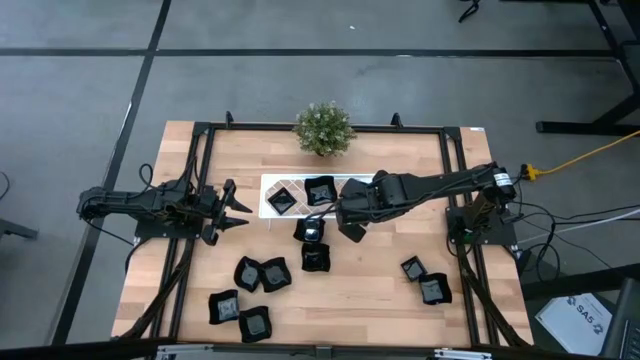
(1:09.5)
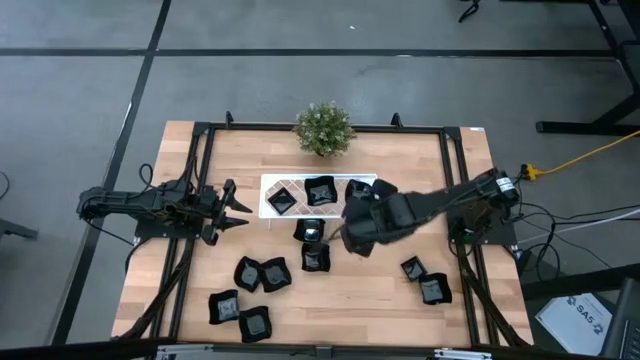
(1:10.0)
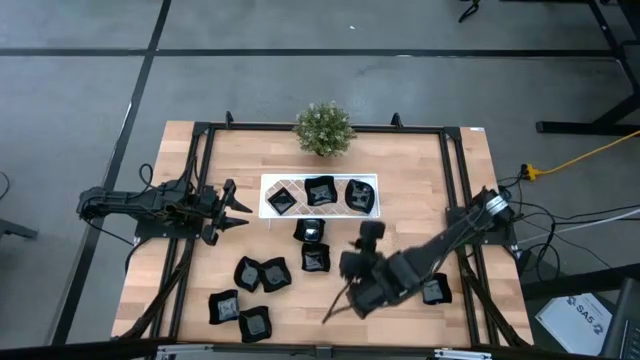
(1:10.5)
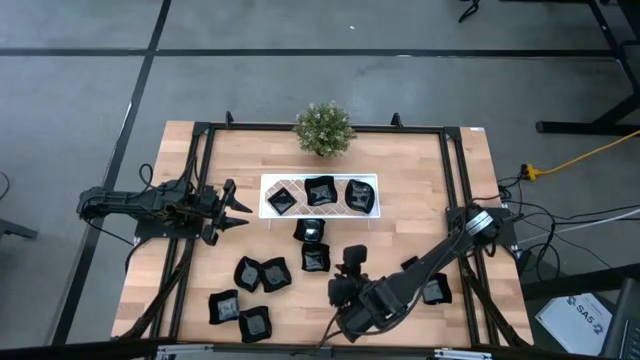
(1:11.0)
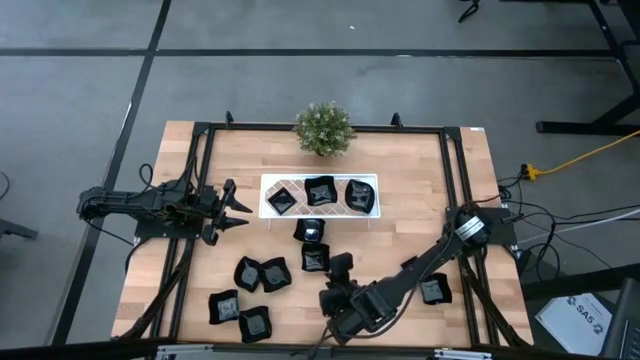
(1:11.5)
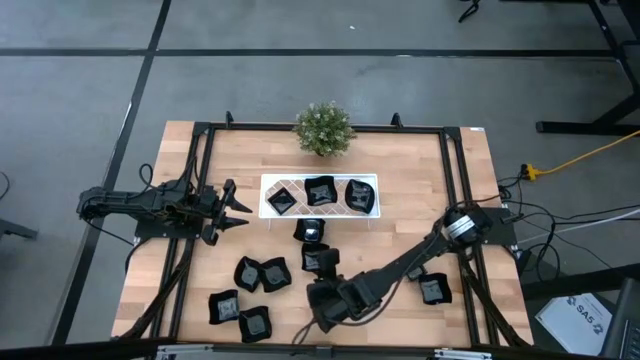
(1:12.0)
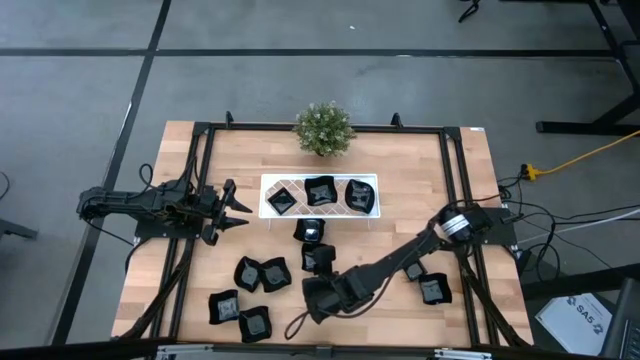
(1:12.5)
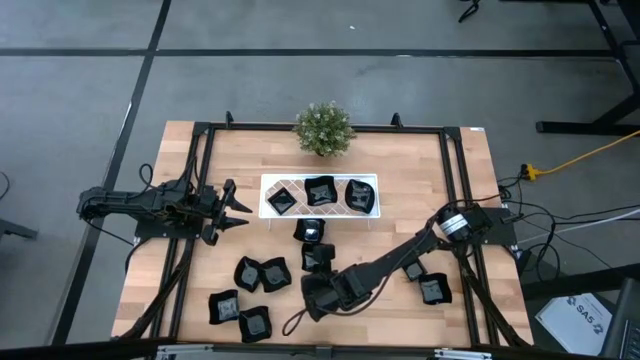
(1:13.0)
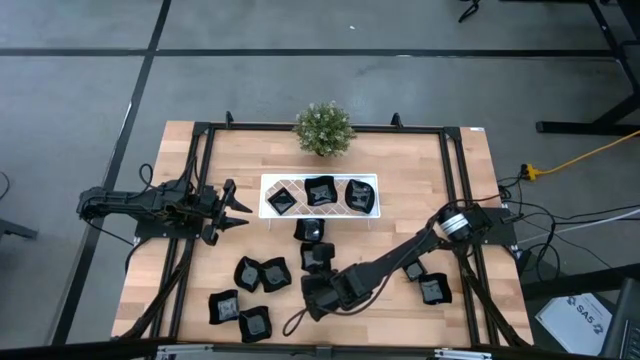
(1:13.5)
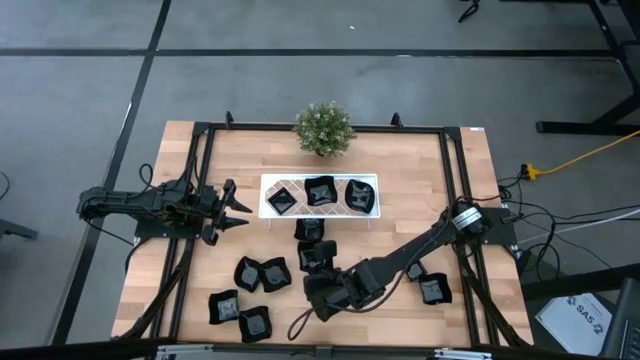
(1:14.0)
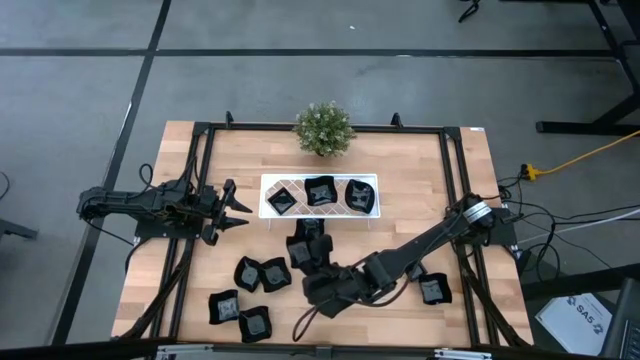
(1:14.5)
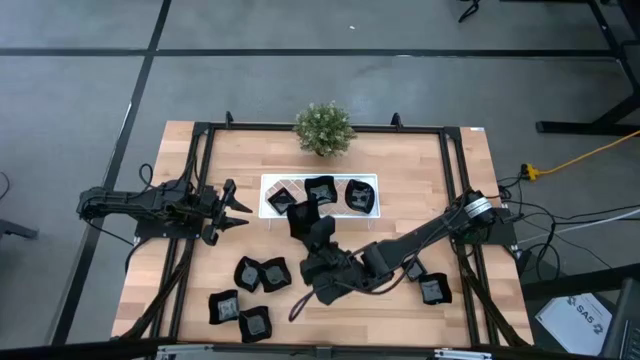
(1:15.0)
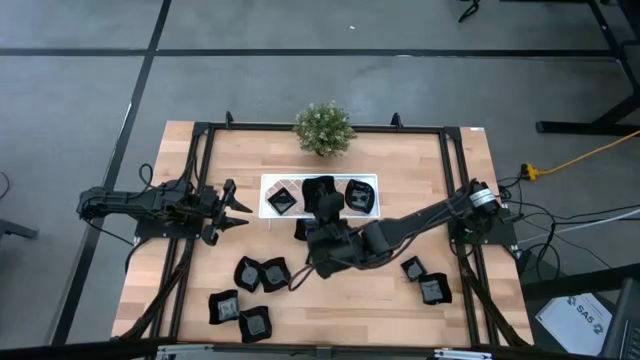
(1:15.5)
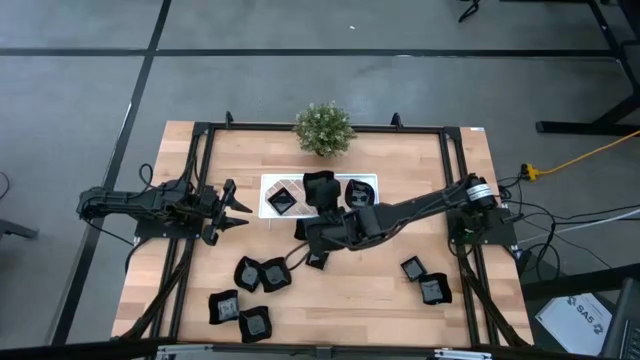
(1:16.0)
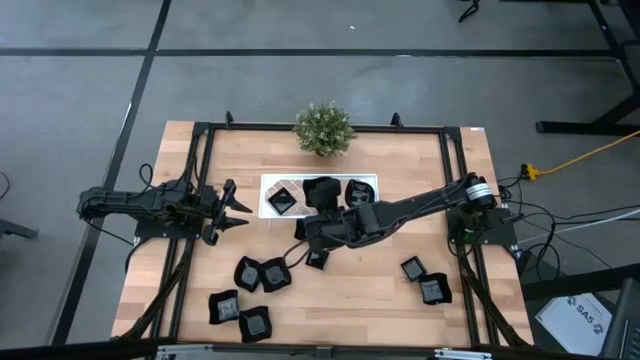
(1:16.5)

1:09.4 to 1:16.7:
Task: Pick & Place Mini shaped plates
Stack the black distorted square plate on top of the black distorted square plate on the shelf

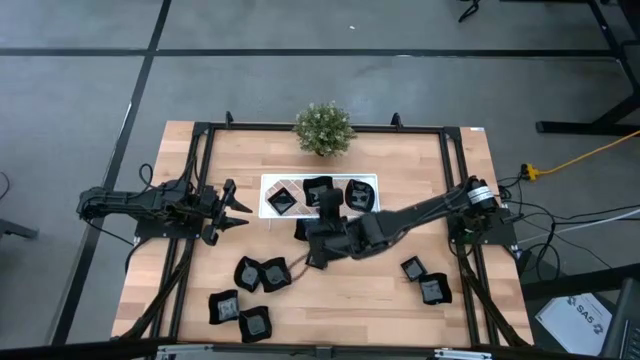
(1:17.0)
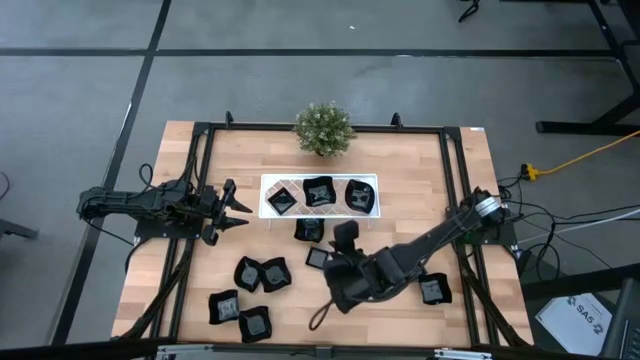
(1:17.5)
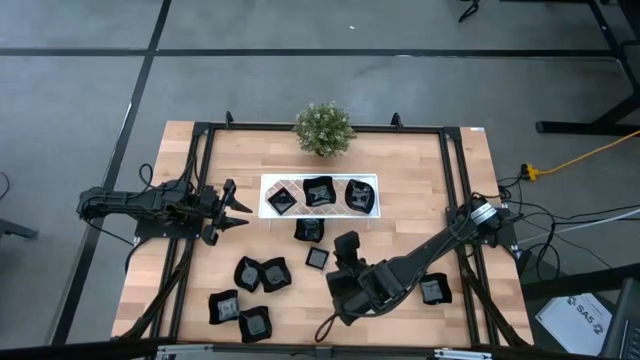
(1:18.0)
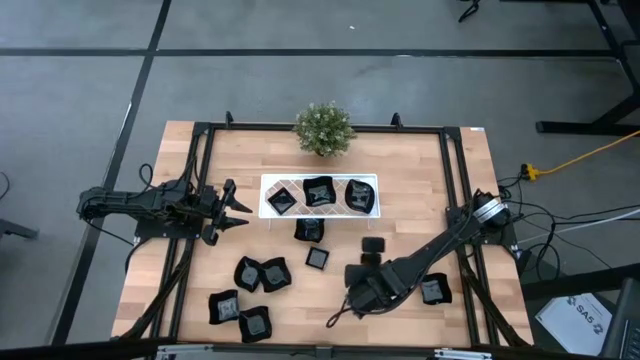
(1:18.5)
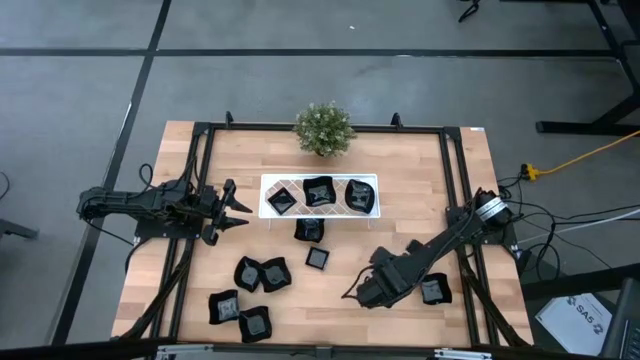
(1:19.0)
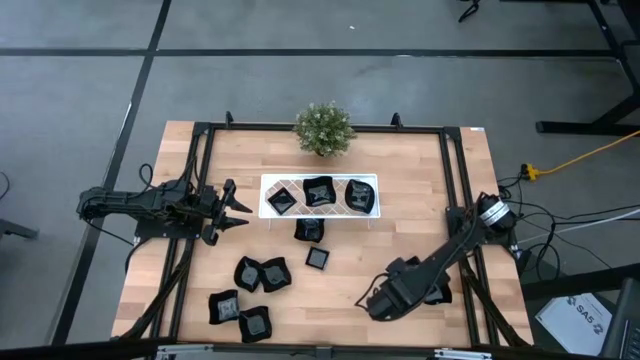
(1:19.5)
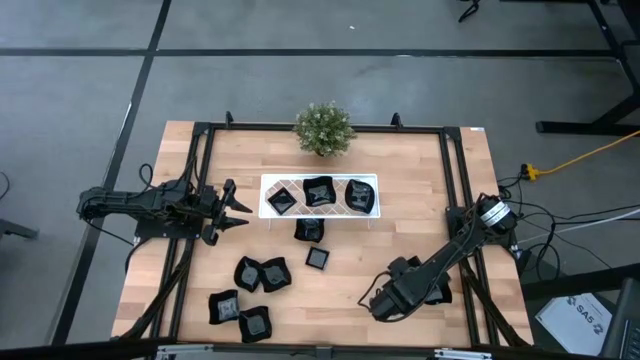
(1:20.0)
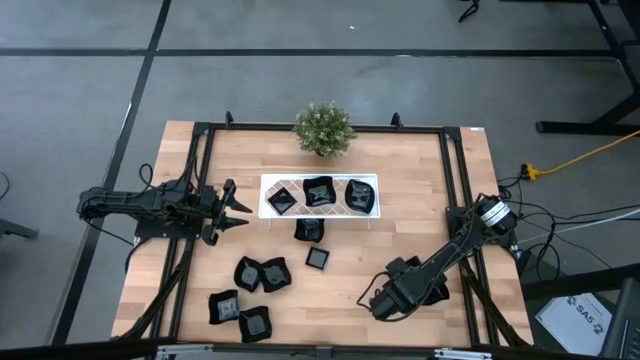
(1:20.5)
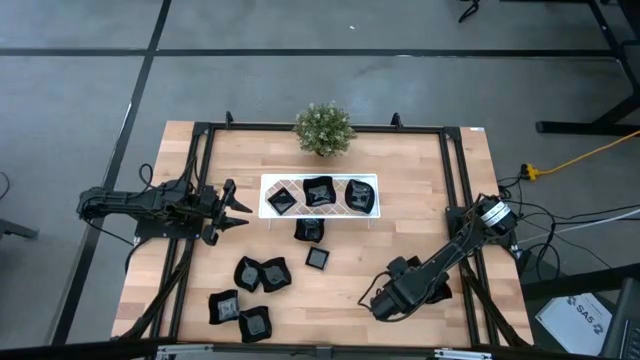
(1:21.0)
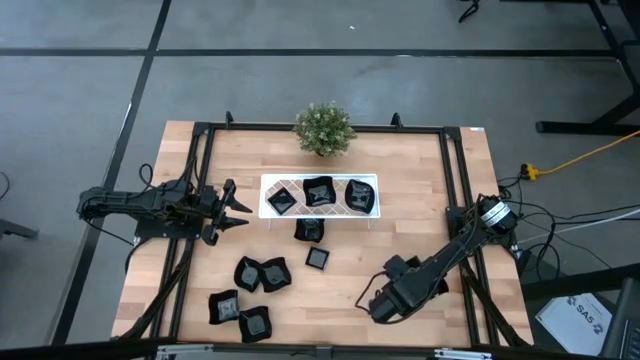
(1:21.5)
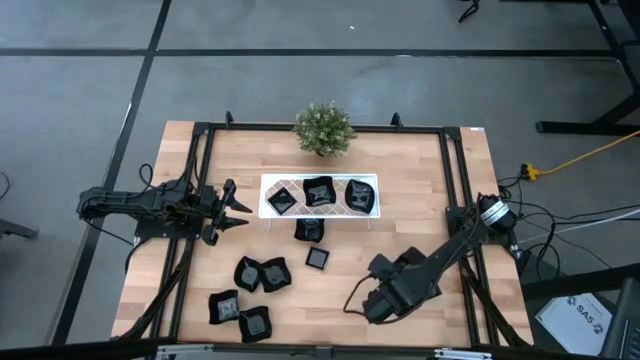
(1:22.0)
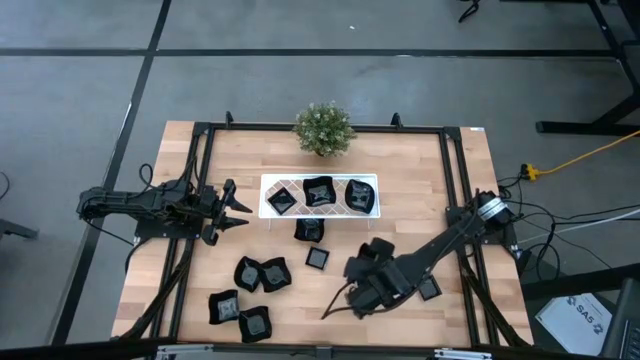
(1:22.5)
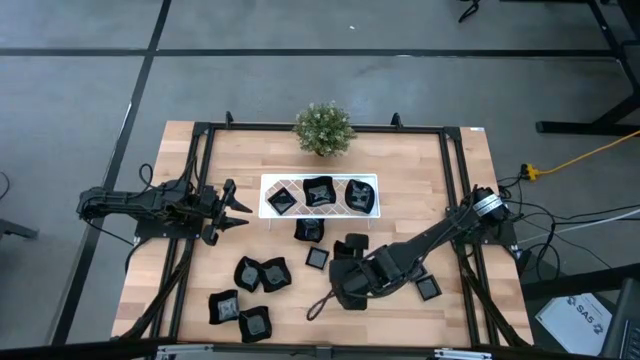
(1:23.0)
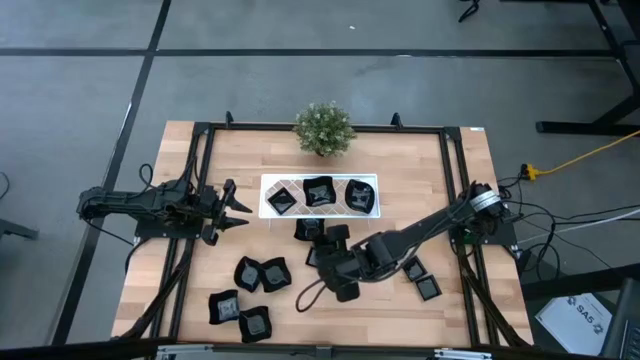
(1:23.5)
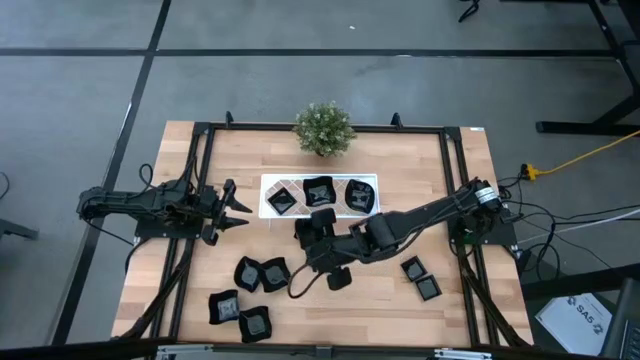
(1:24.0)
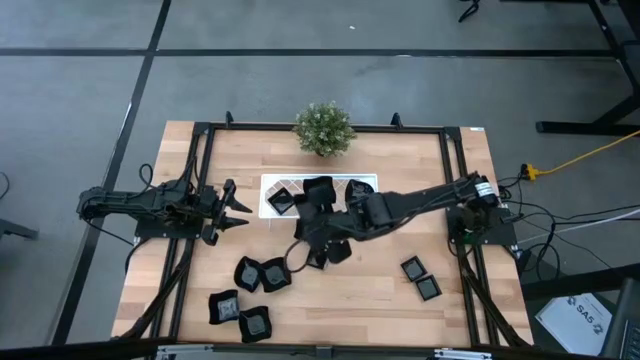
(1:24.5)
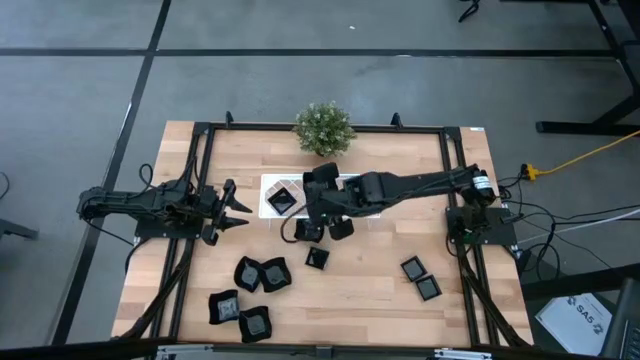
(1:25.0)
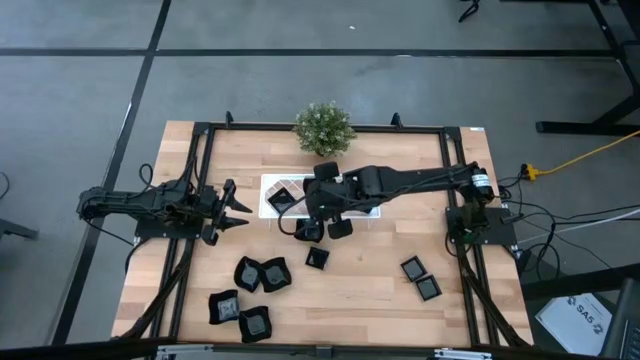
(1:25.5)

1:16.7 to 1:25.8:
Stack the black distorted square plate on top of the black distorted square plate on the shelf

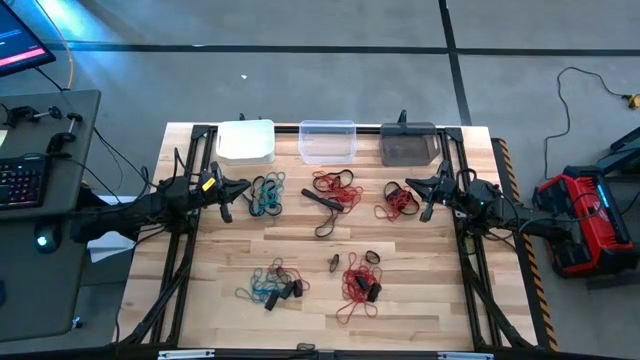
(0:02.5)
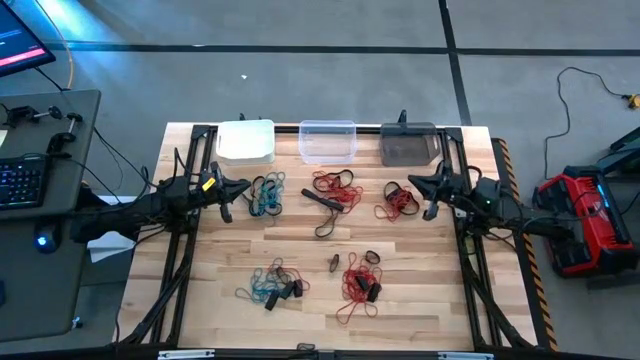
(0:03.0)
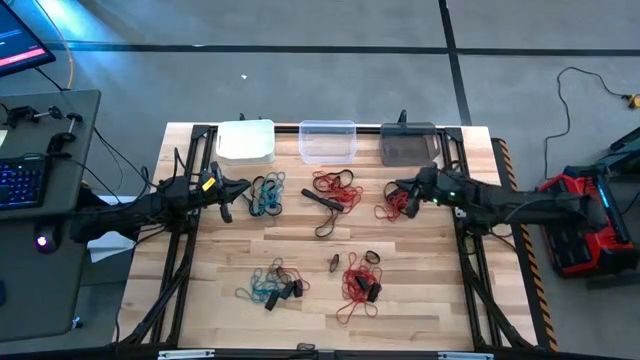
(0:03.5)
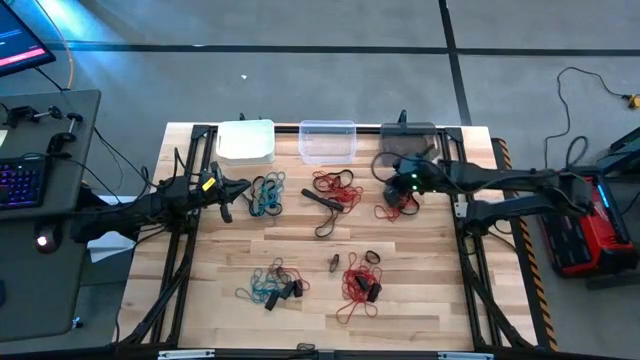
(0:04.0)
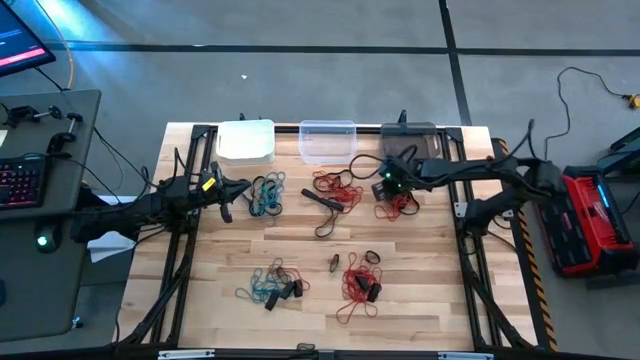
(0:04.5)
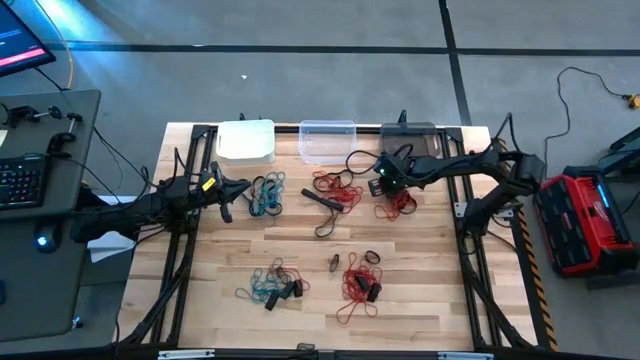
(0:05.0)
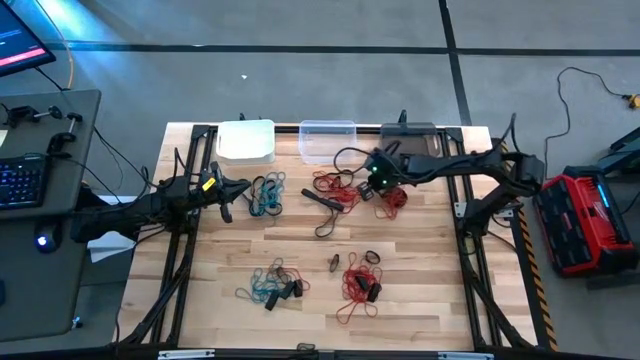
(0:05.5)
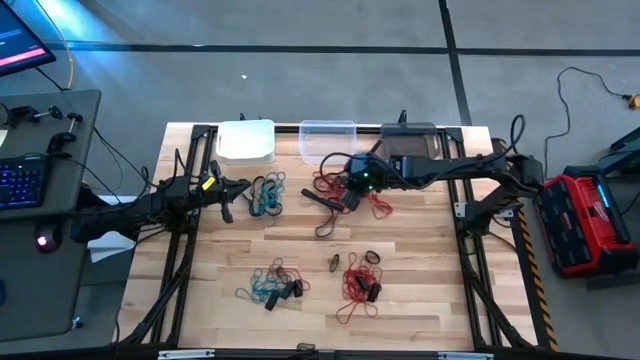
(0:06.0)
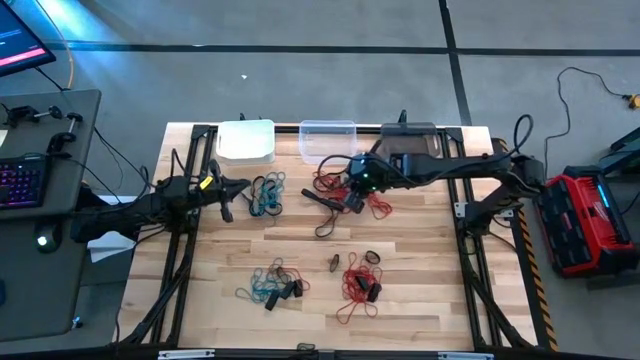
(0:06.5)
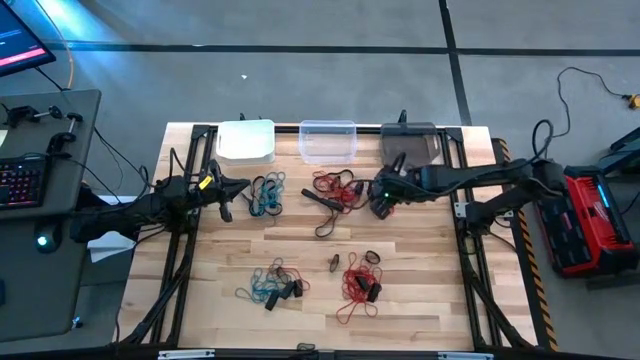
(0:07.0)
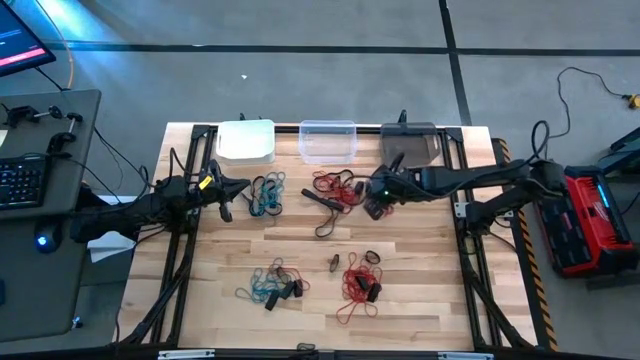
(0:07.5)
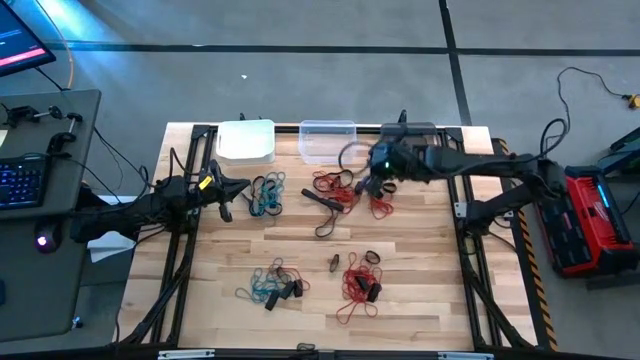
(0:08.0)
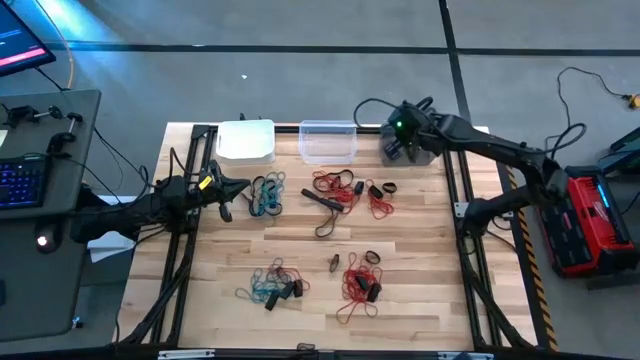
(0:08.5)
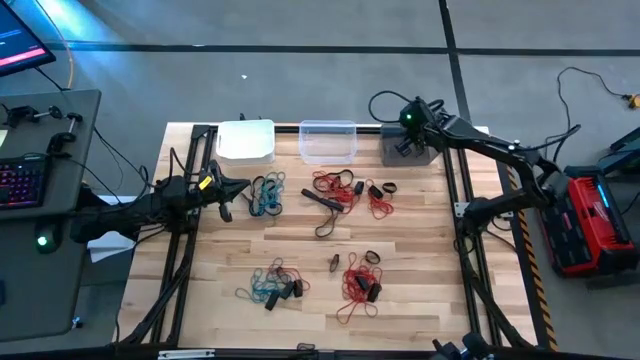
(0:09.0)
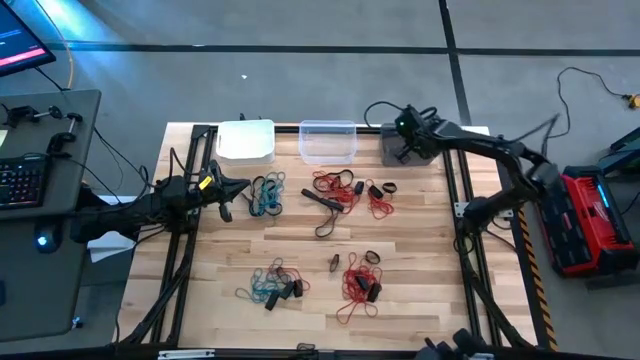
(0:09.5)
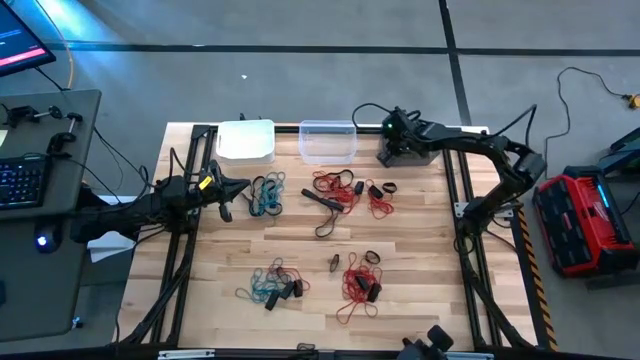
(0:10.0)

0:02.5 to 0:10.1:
Task: Sort rubber bands into baskets
Put the black rubber band into the black bin
